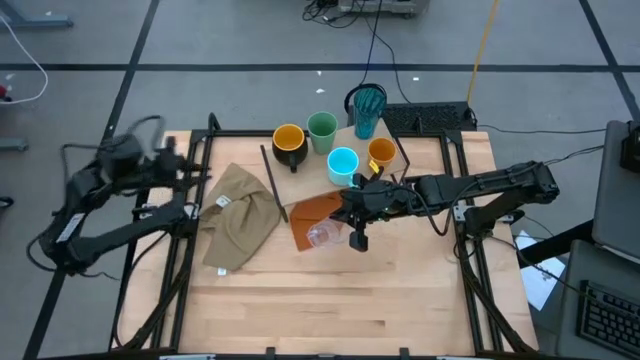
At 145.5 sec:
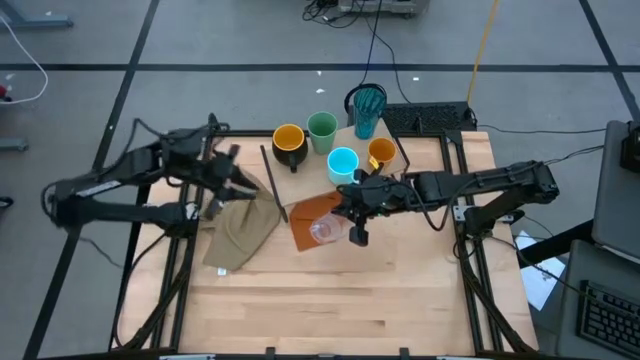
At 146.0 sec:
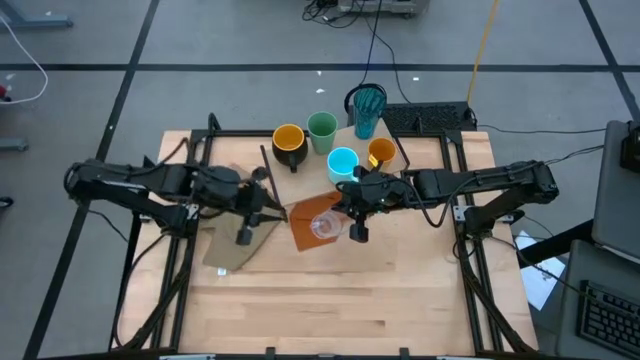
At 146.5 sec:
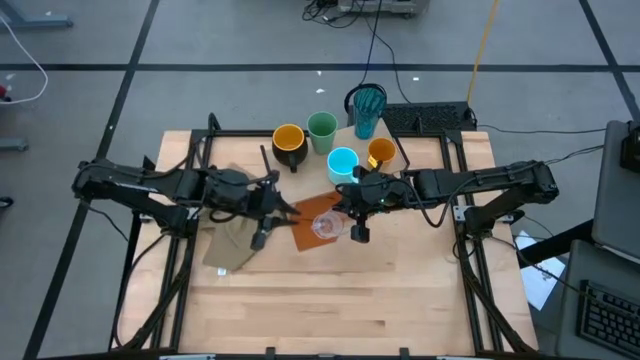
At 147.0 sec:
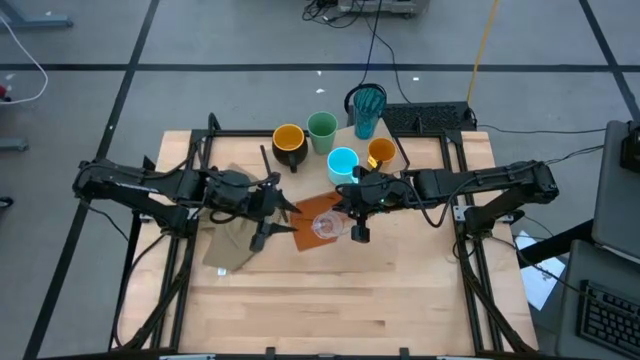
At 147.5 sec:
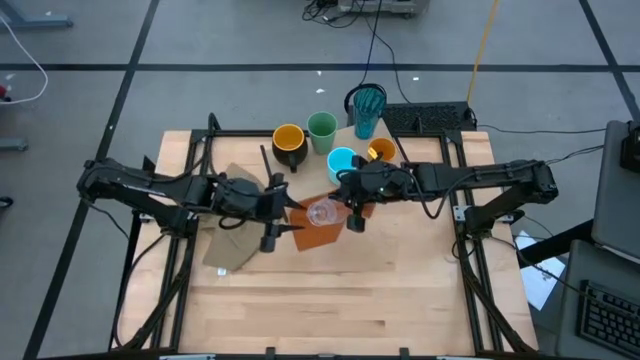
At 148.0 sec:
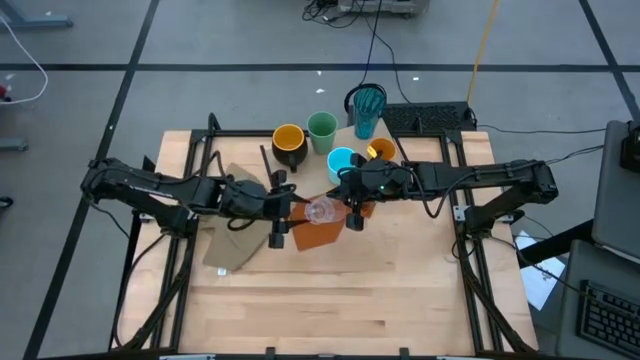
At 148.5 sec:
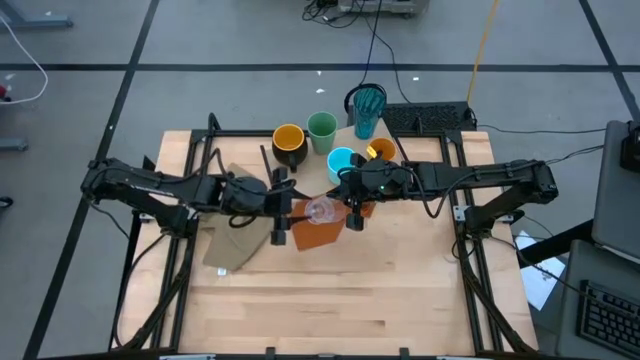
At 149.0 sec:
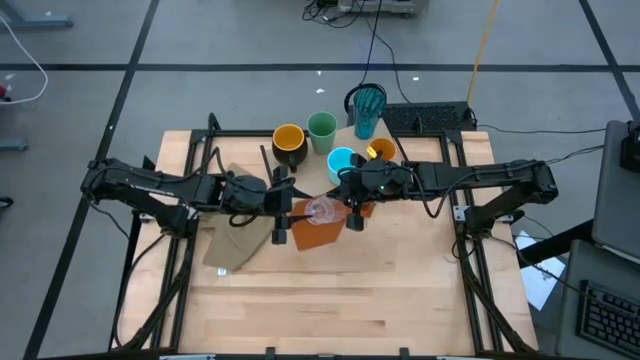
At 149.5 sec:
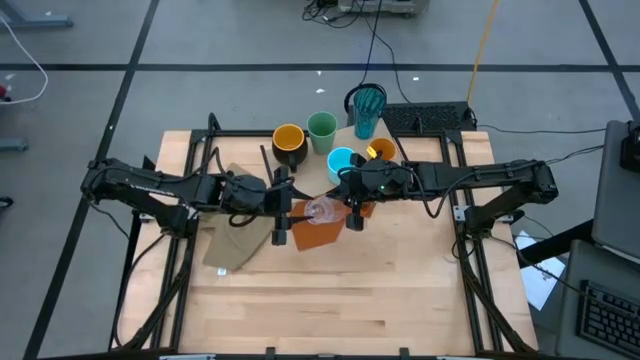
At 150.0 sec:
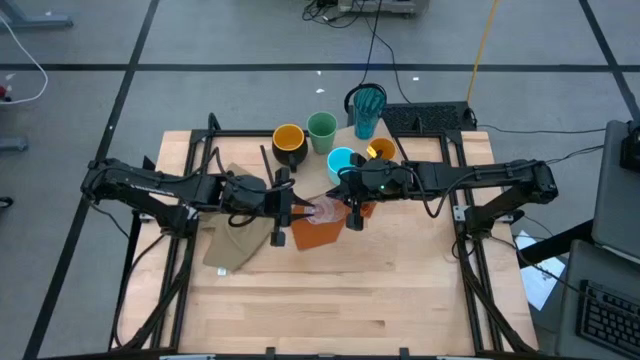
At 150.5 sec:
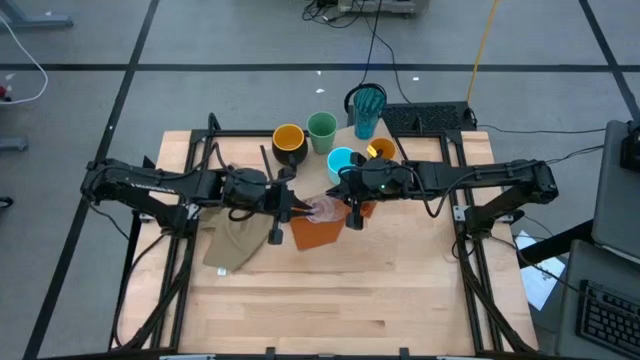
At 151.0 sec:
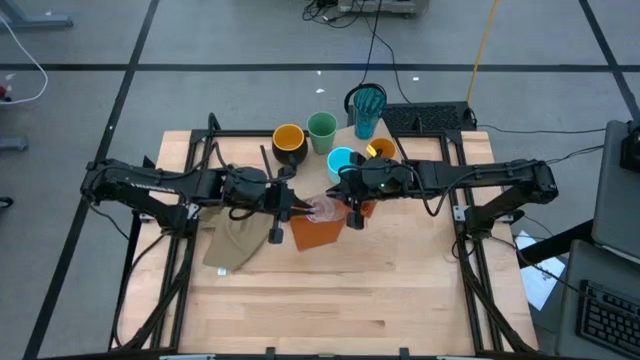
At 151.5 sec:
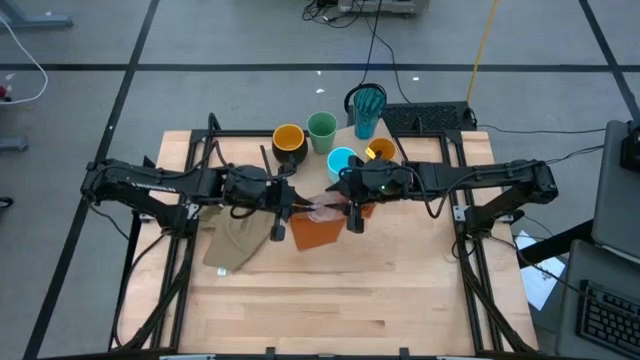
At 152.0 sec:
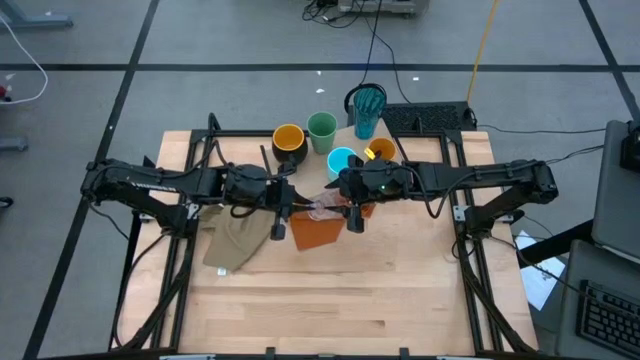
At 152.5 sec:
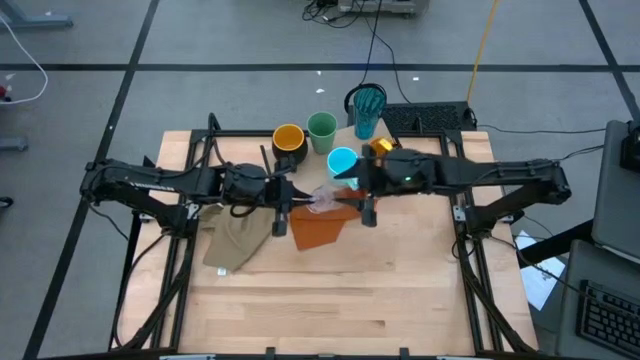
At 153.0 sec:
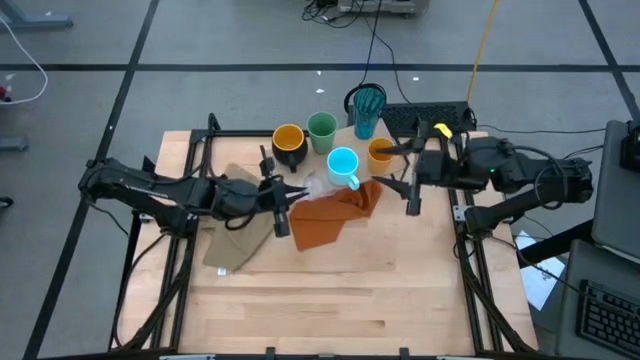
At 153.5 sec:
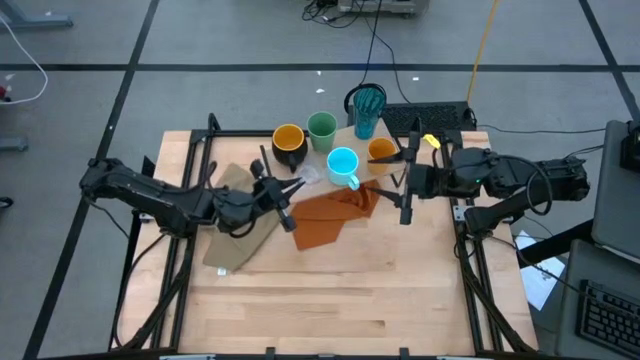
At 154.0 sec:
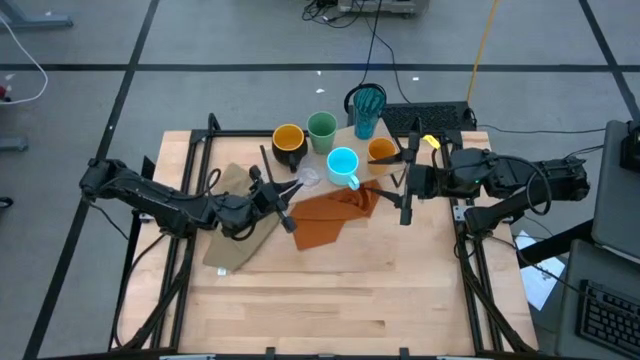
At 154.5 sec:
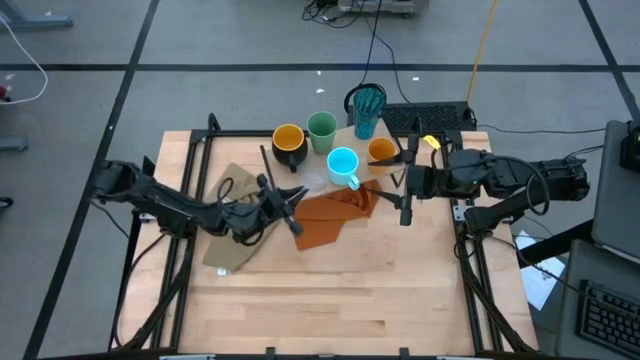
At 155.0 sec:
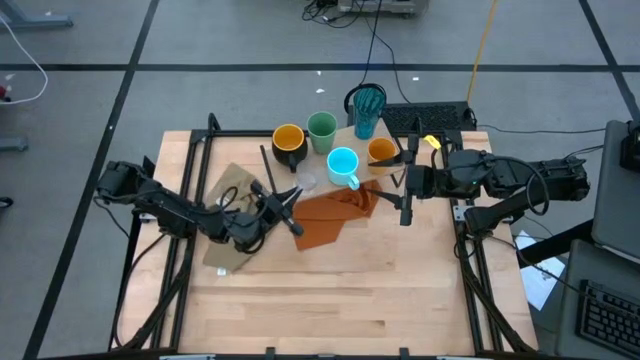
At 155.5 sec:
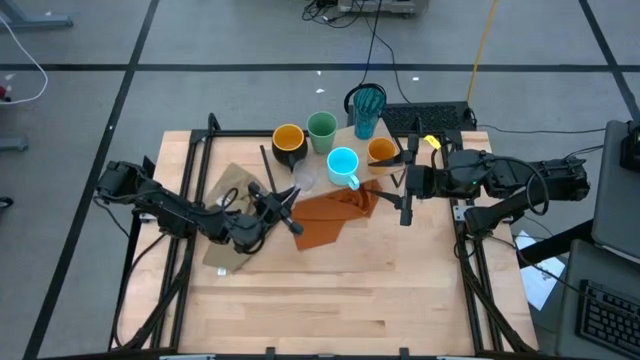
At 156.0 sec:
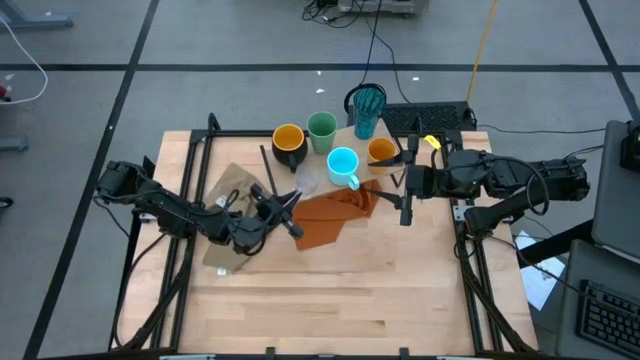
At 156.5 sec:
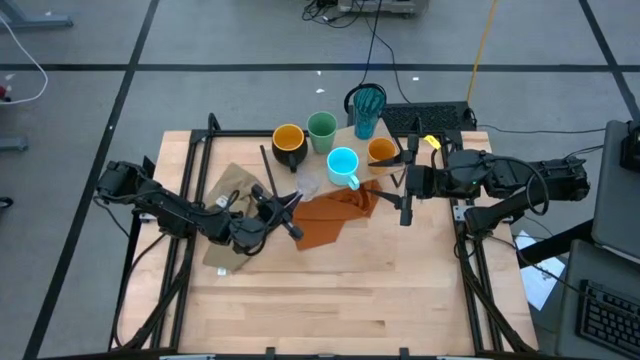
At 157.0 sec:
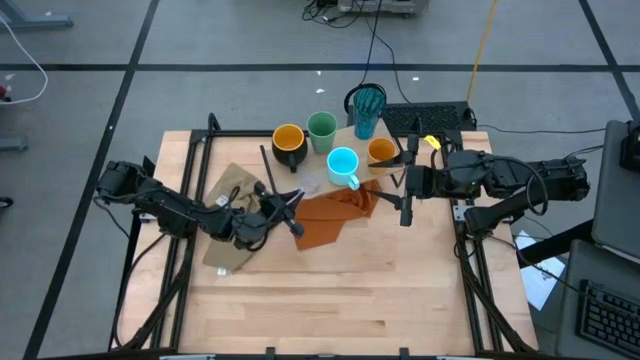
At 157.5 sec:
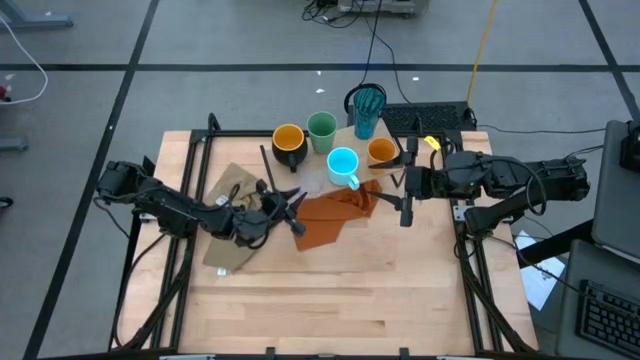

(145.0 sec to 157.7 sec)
Task: Stack small to large cups/mugs on shelf
Put the transparent mug on the shelf

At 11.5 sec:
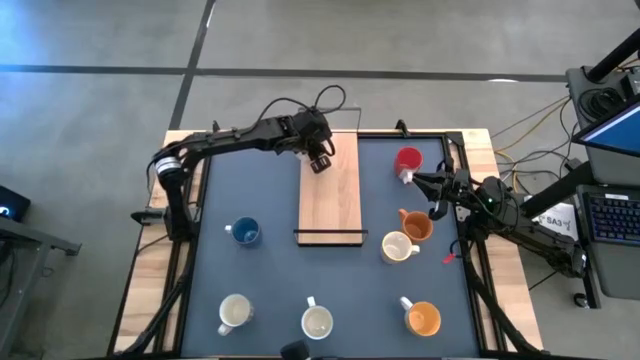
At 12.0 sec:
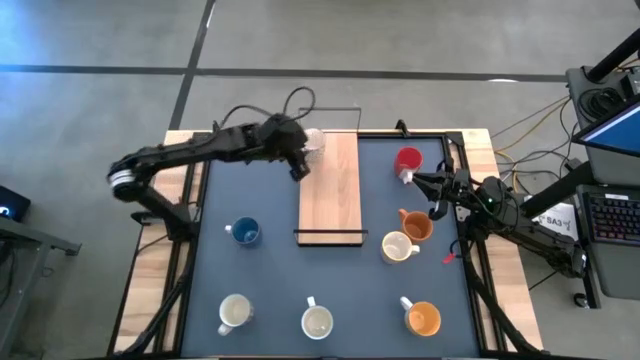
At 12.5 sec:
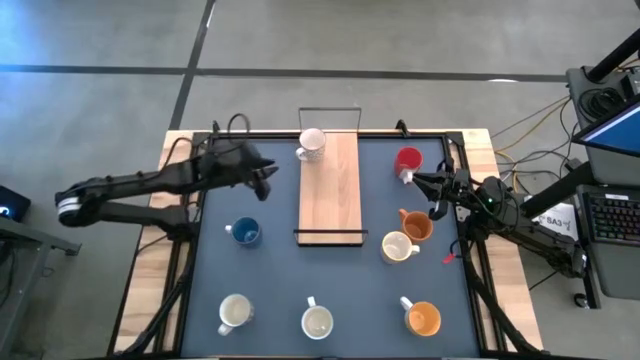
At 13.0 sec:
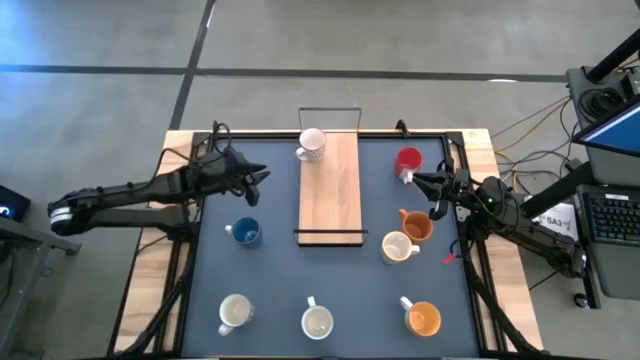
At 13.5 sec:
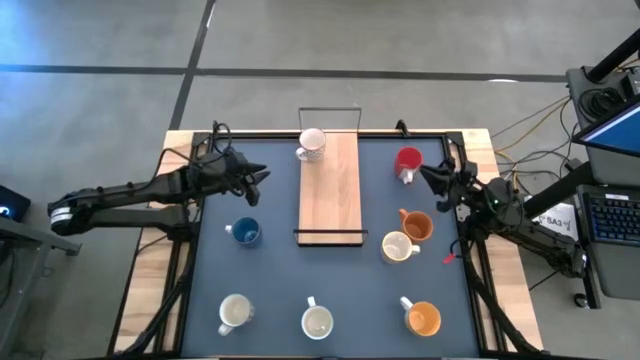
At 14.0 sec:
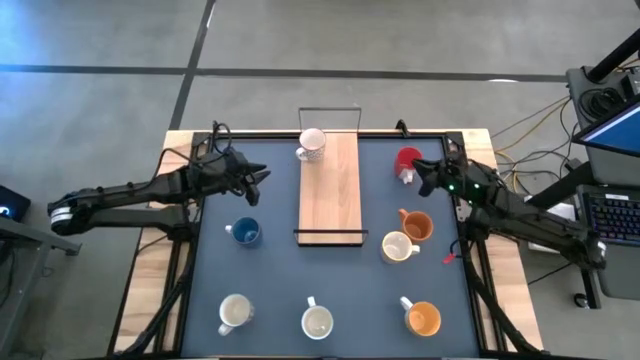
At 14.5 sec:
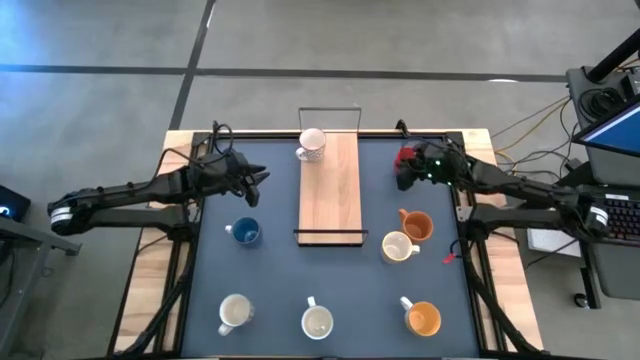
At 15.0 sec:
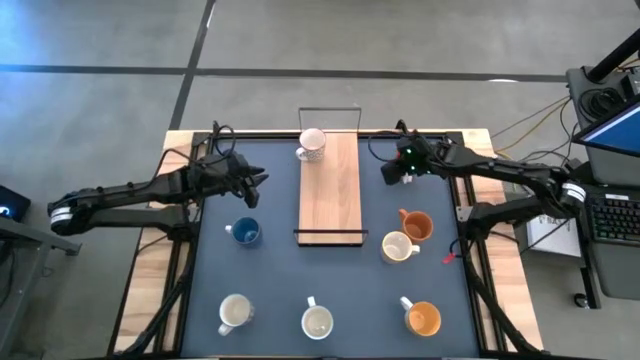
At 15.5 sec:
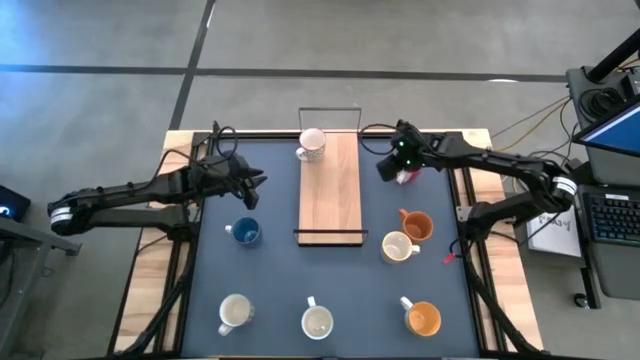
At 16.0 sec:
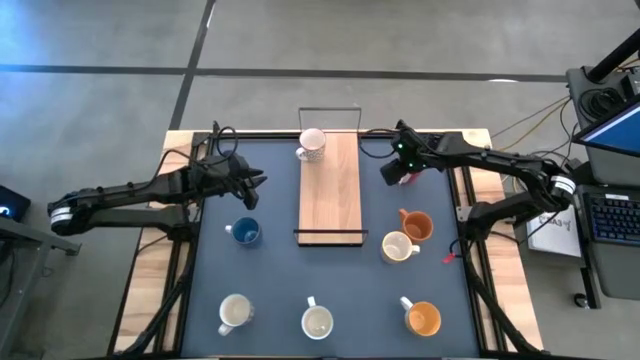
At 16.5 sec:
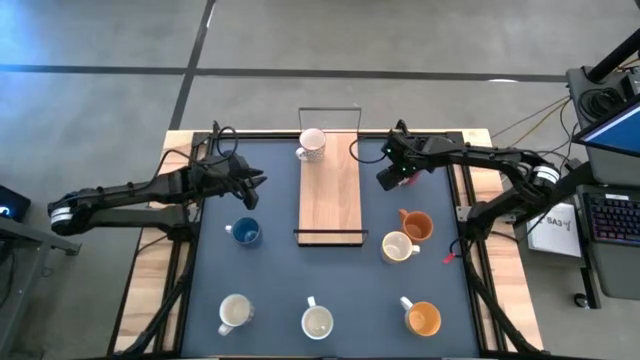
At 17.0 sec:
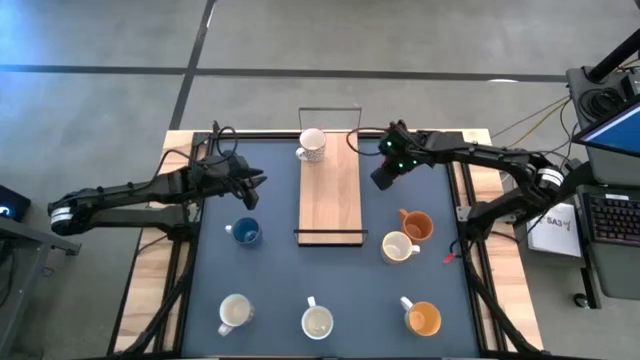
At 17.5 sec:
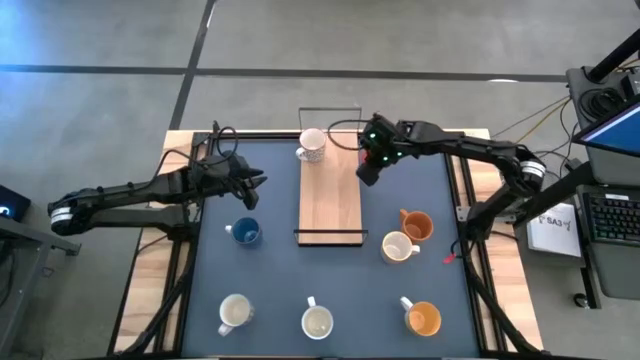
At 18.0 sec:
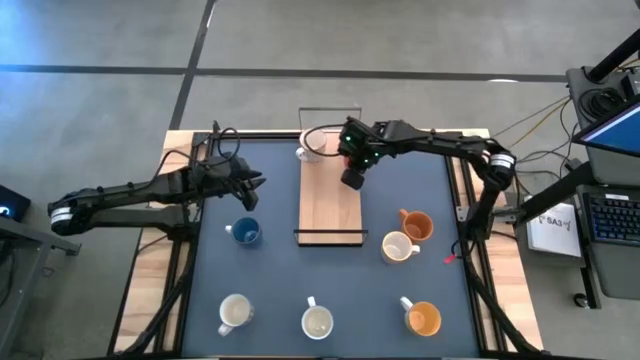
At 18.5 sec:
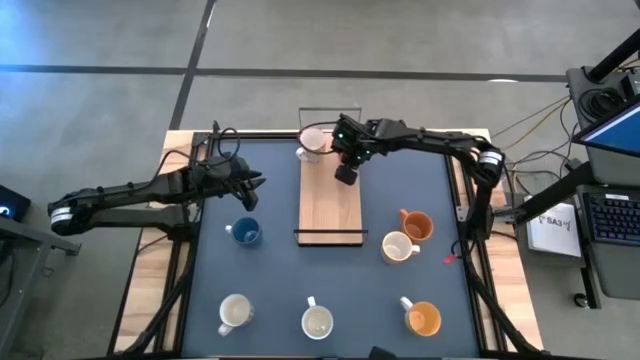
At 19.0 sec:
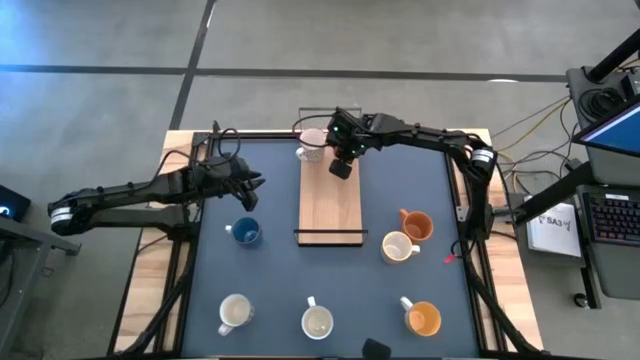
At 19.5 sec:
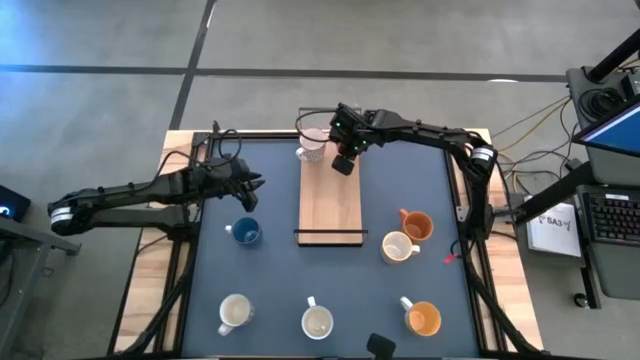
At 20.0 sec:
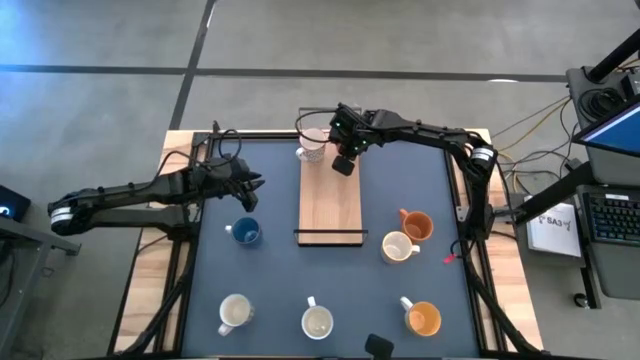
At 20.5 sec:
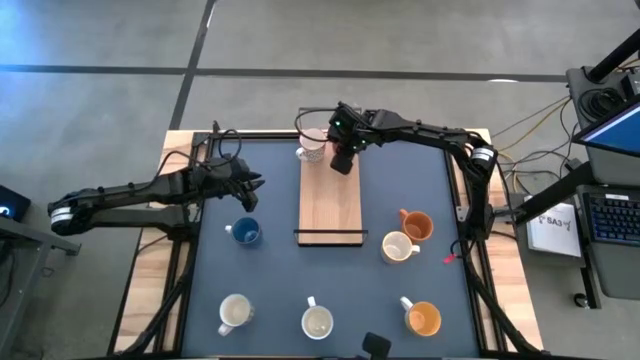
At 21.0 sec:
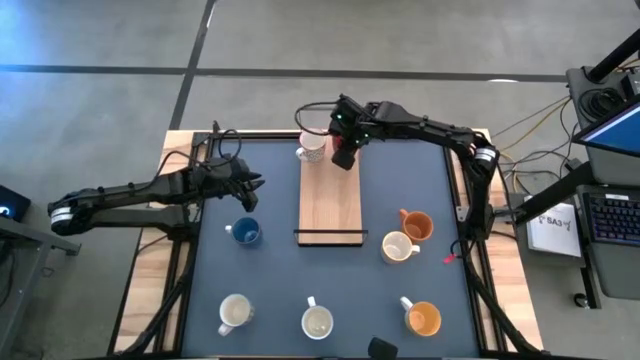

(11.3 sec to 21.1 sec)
Task: Place coffee mugs
Put the red mug on the shelf
